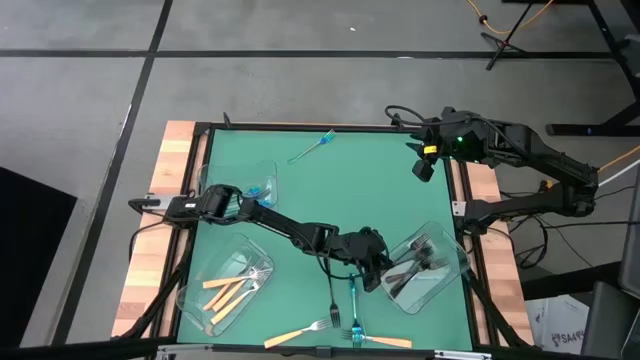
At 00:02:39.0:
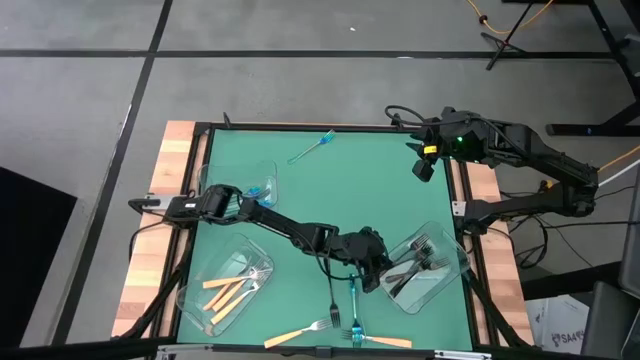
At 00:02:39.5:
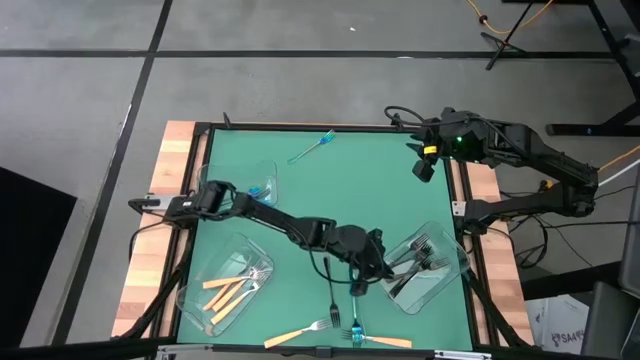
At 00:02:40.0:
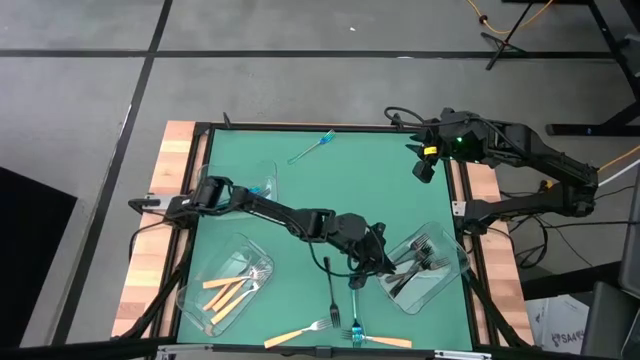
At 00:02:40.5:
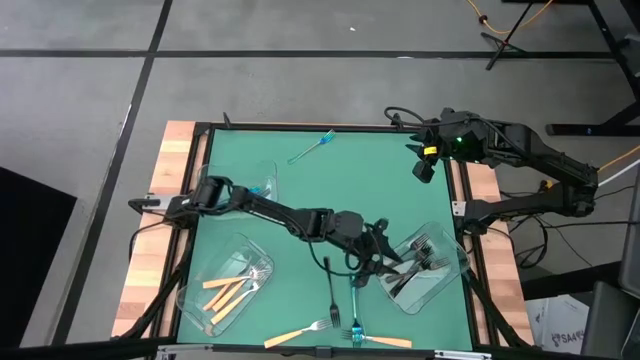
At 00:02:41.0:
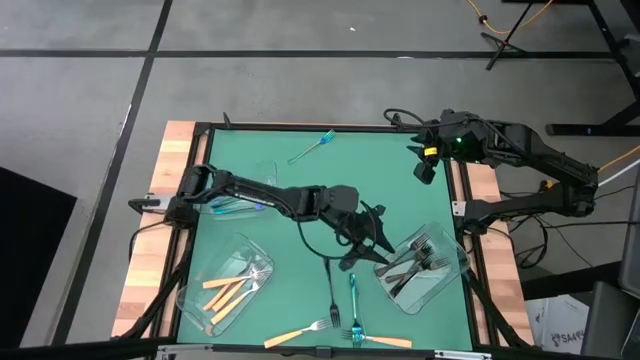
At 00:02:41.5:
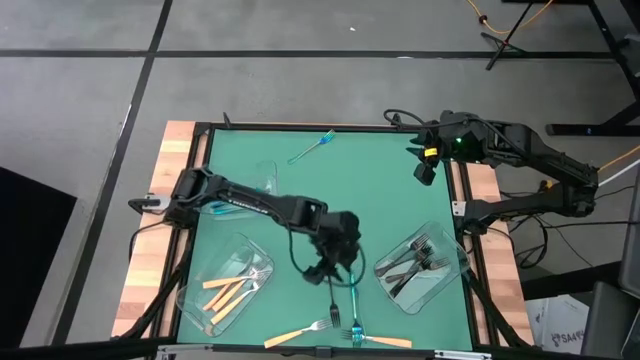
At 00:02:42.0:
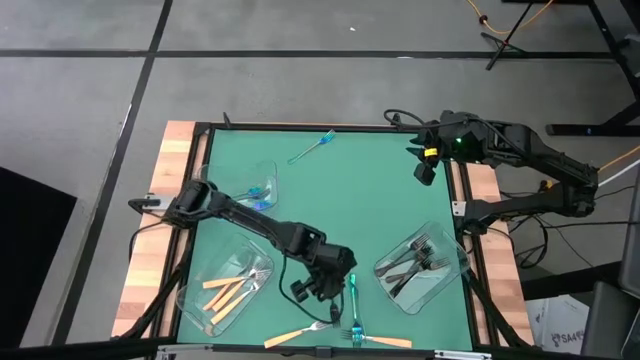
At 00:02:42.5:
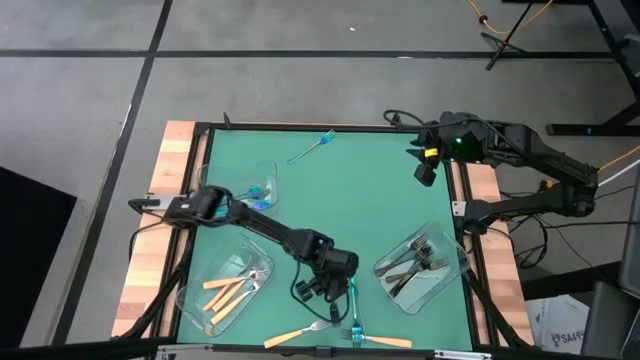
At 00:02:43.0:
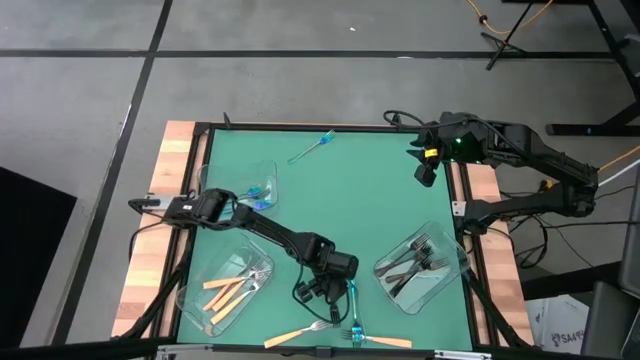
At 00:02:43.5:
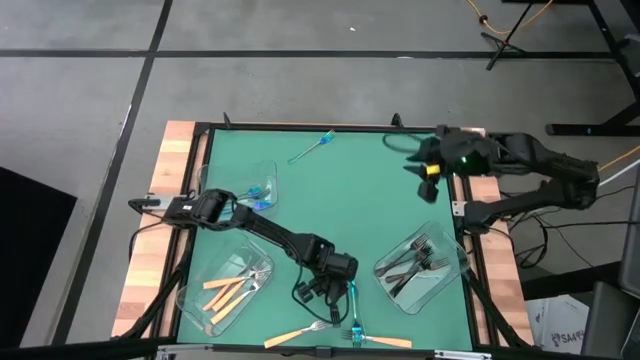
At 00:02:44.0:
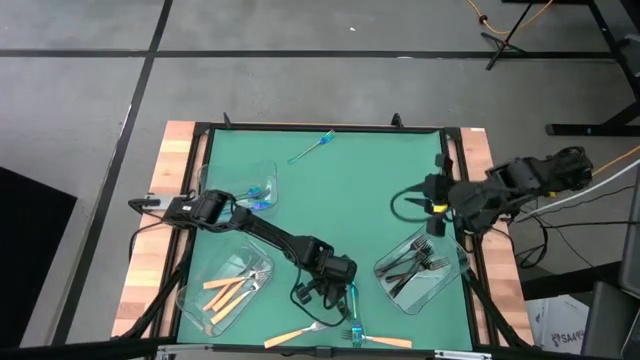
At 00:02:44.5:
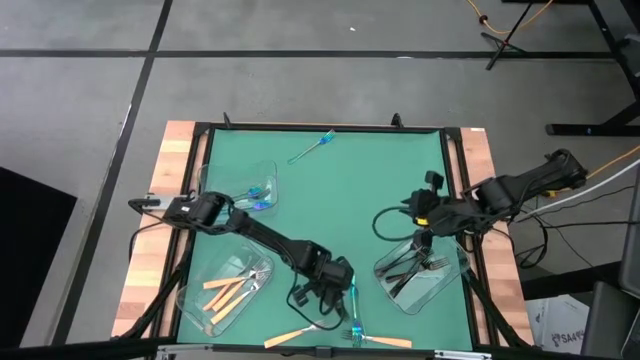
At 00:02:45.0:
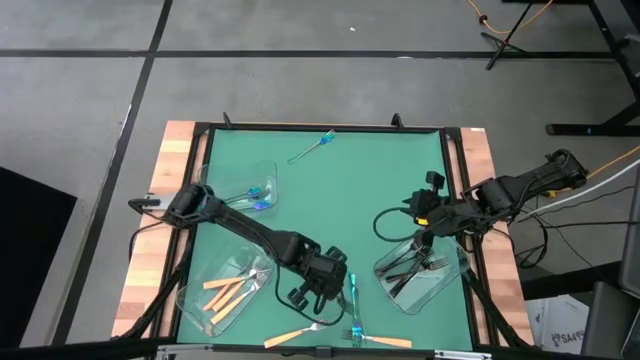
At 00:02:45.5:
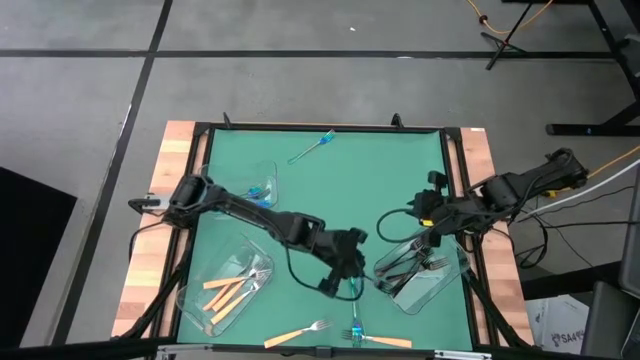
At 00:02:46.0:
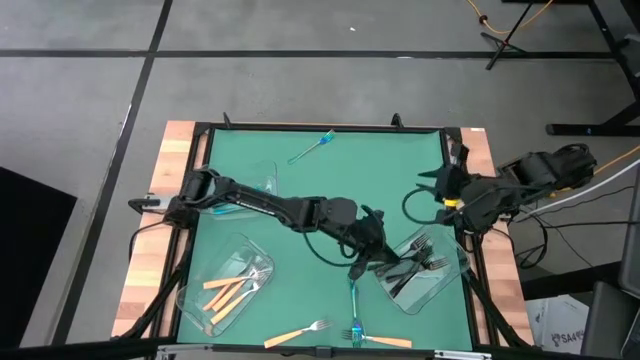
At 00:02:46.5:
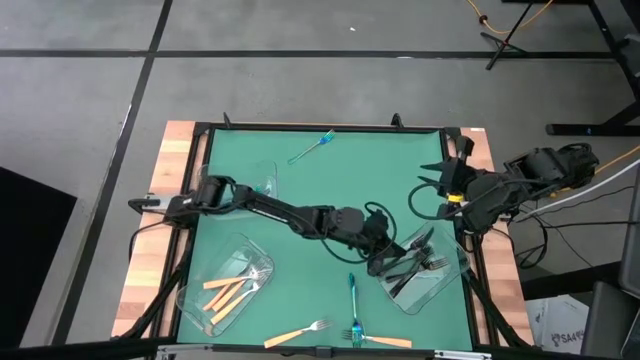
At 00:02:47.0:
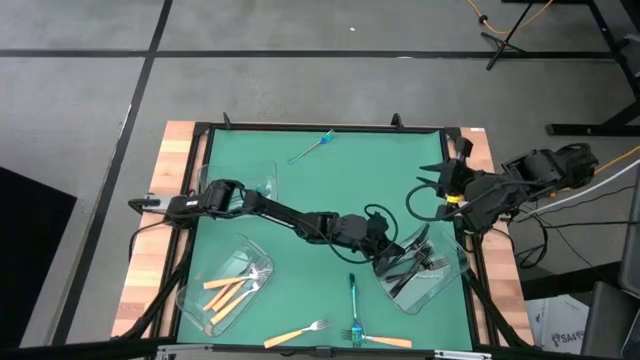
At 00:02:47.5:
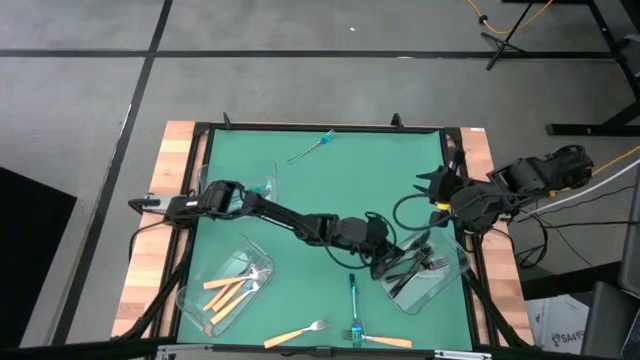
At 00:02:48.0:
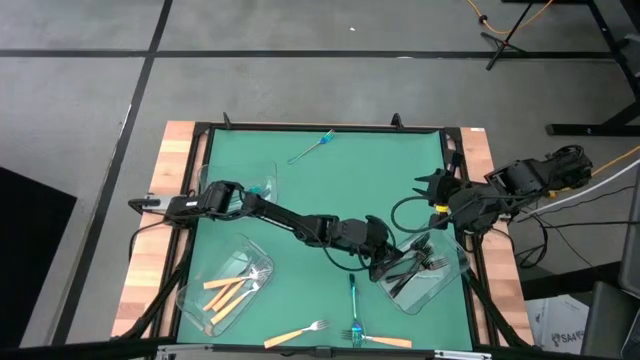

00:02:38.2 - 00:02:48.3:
Task: Sort silverware by color (type)
Put the black fork into the bottom right transparent bin

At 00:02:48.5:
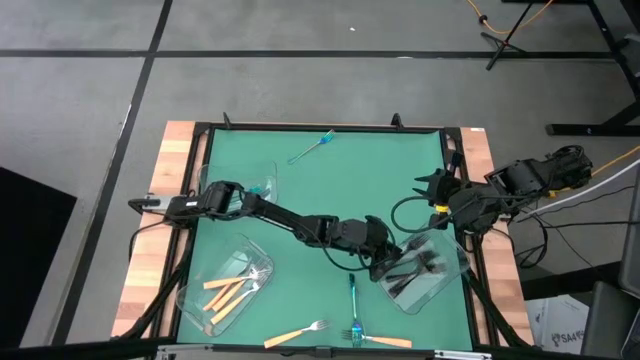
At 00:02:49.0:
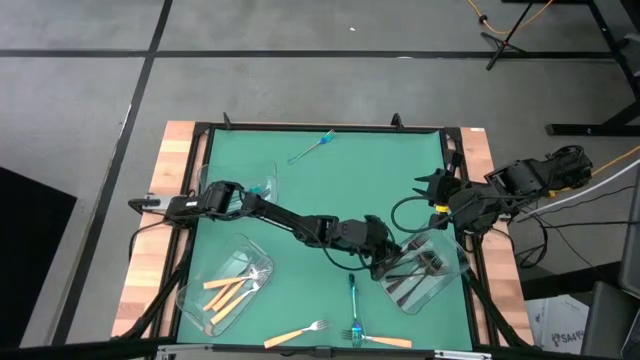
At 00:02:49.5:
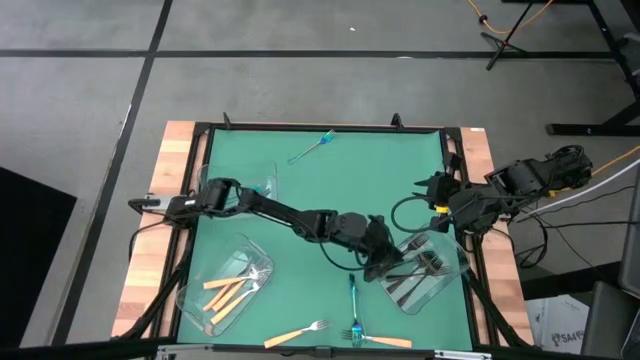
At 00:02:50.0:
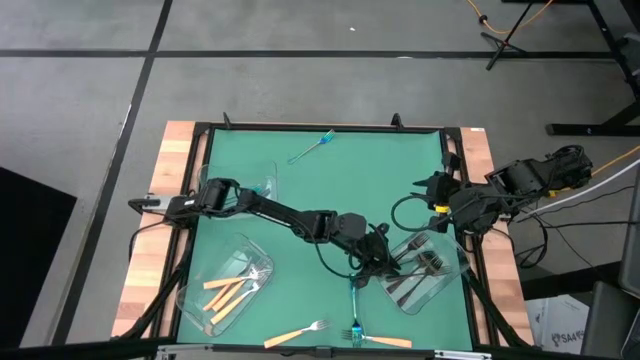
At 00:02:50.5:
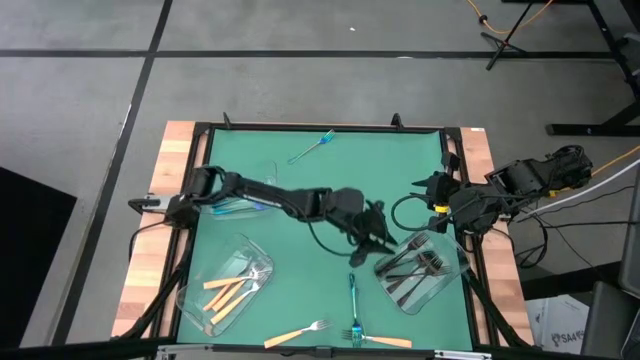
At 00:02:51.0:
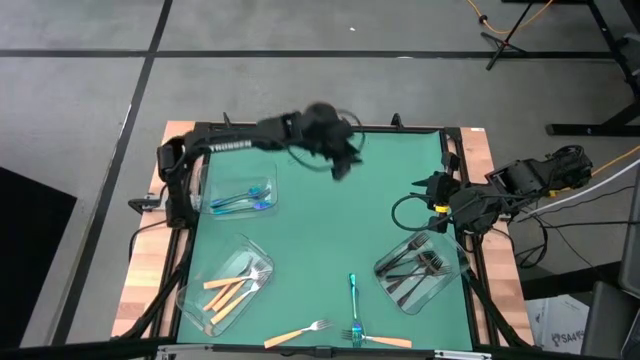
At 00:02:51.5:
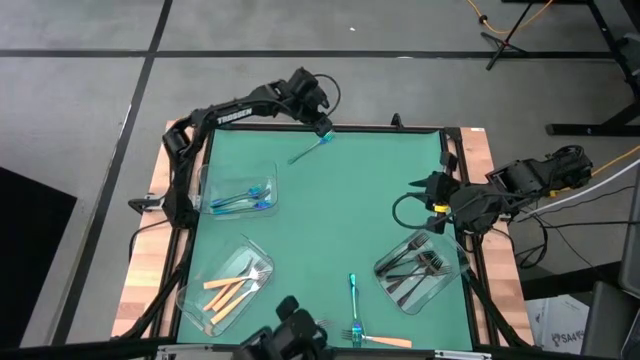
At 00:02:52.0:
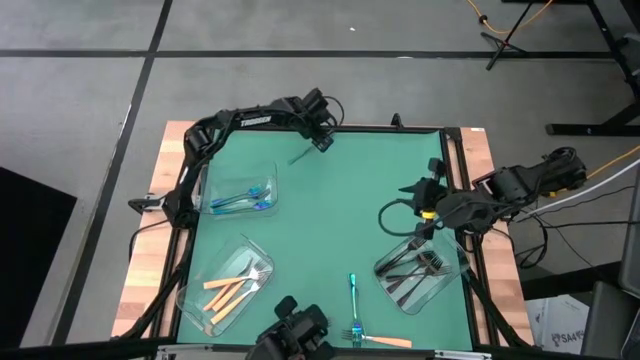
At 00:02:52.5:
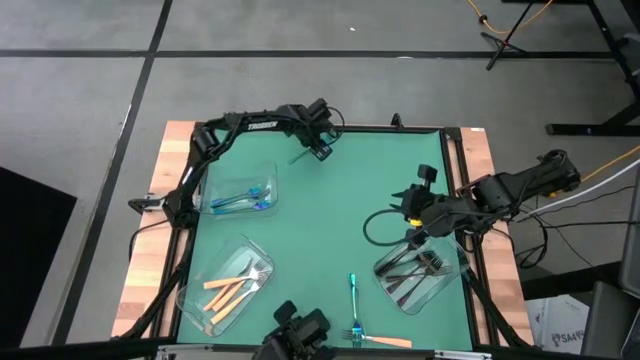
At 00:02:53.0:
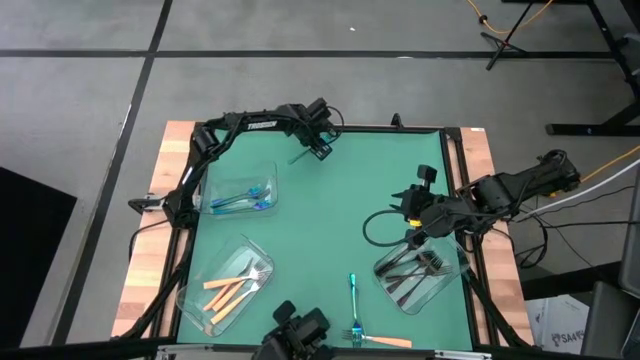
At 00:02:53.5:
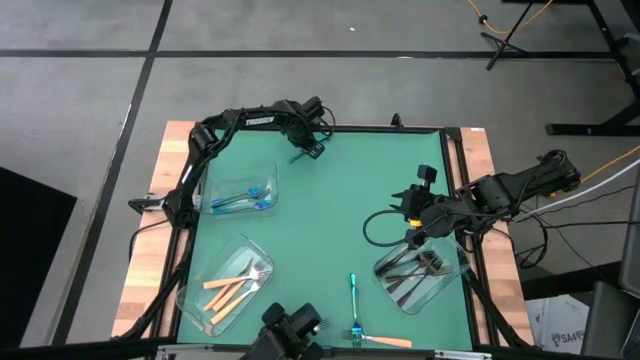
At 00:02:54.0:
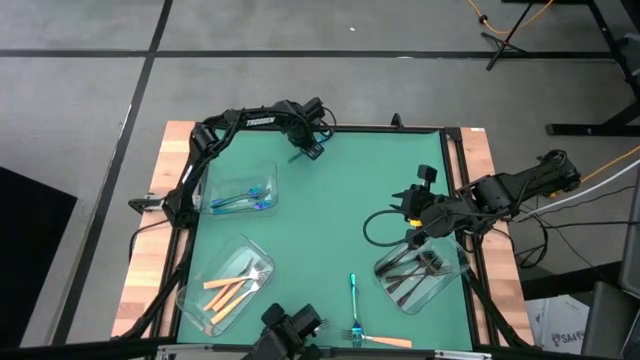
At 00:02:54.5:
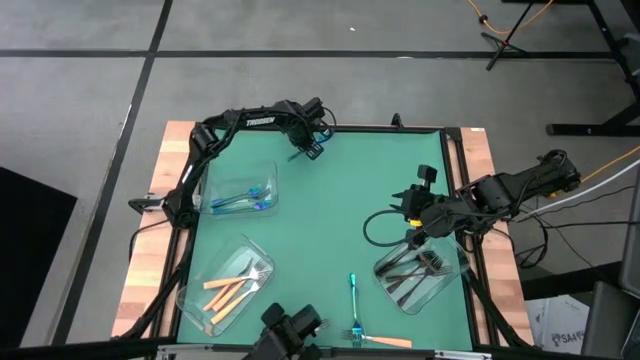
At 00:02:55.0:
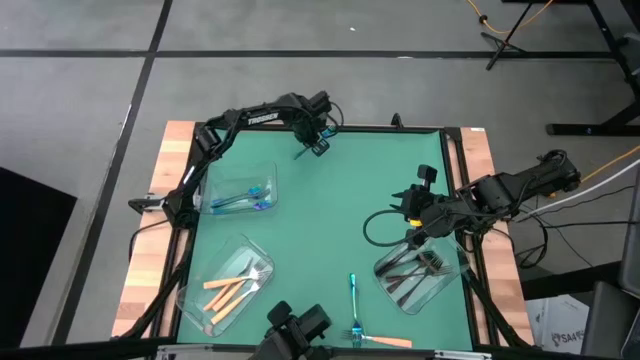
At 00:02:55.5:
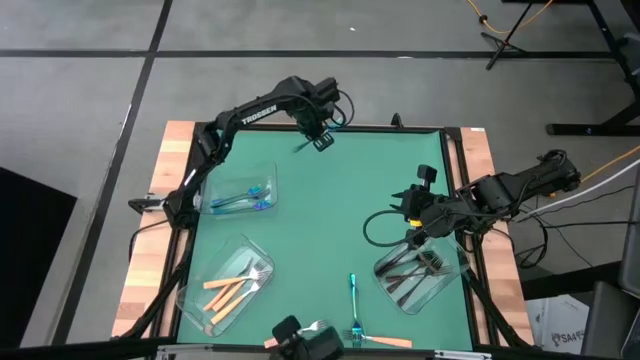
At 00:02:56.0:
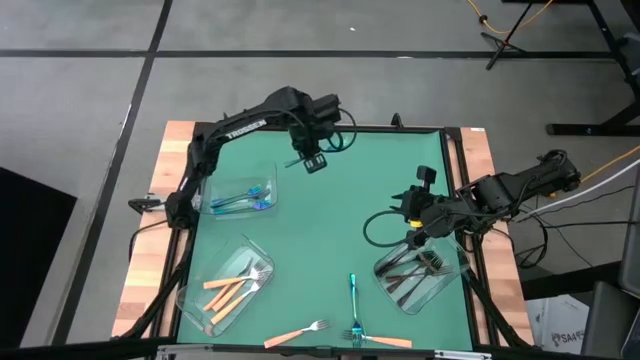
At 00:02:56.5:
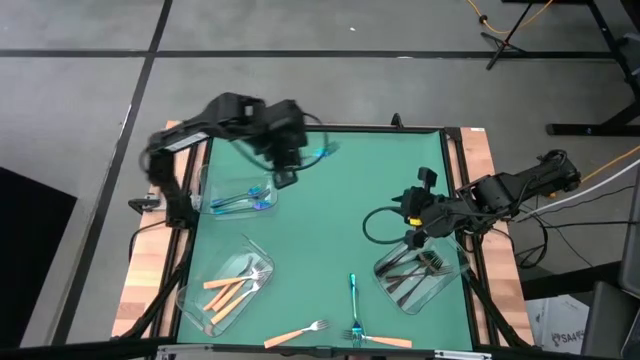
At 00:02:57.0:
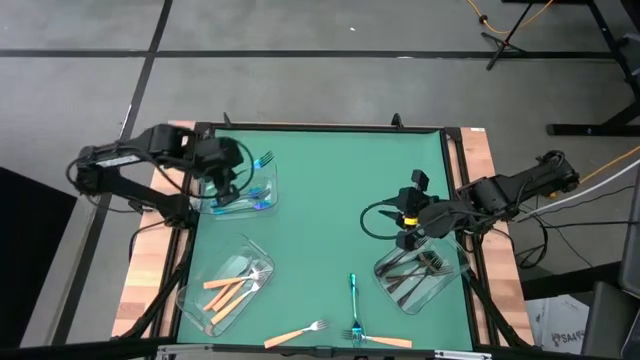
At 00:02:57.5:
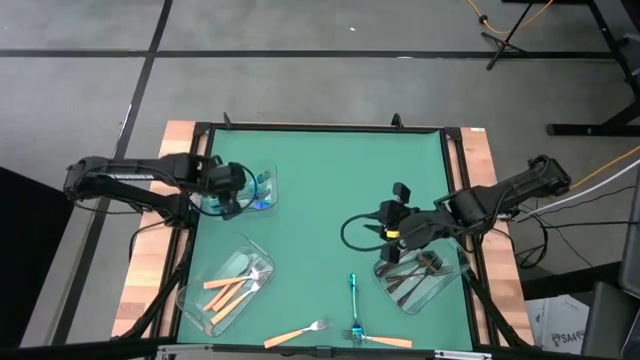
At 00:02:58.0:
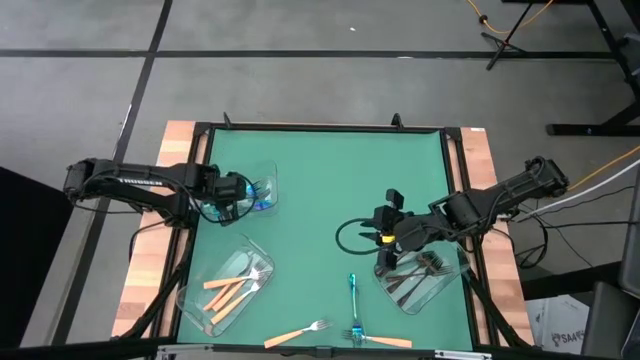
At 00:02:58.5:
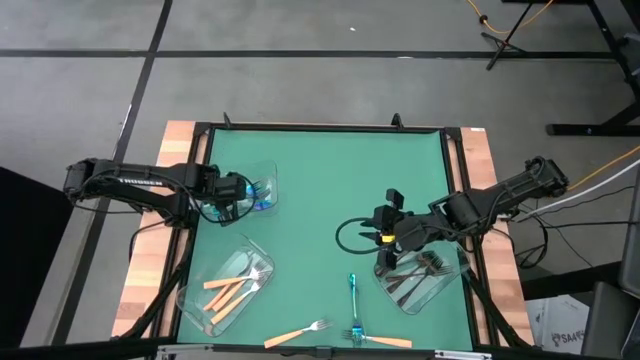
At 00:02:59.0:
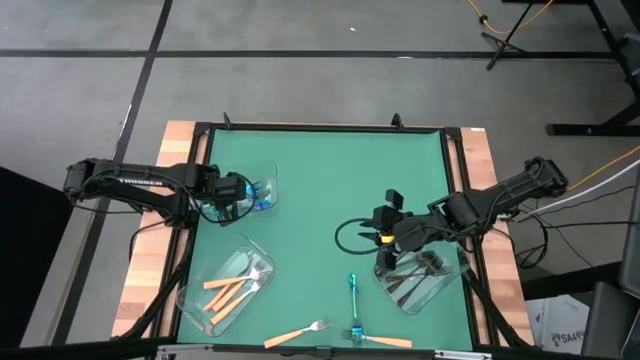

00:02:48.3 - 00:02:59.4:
Put the top blue fork into the top left transparent bin
